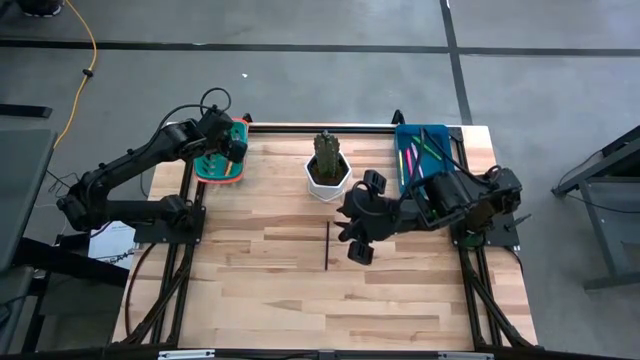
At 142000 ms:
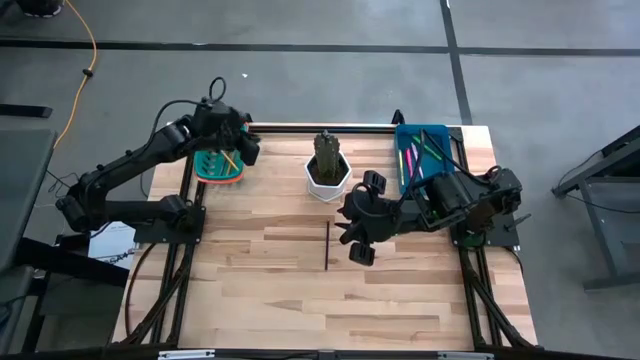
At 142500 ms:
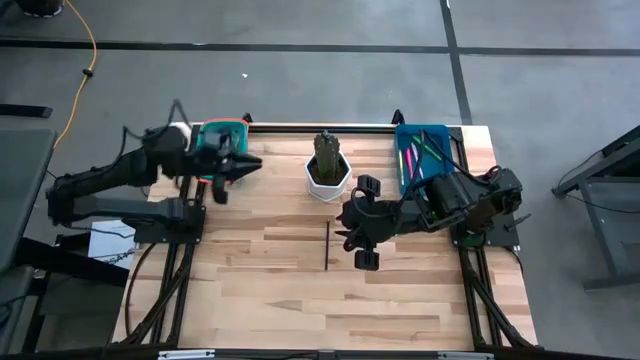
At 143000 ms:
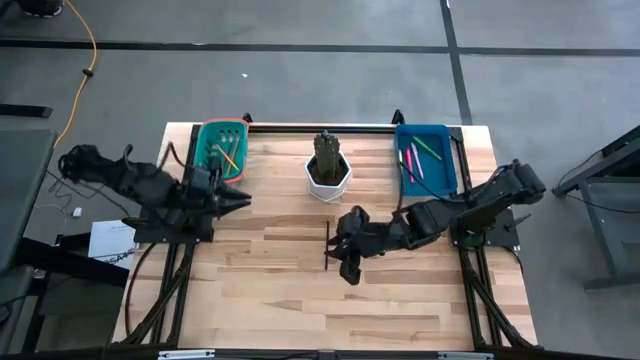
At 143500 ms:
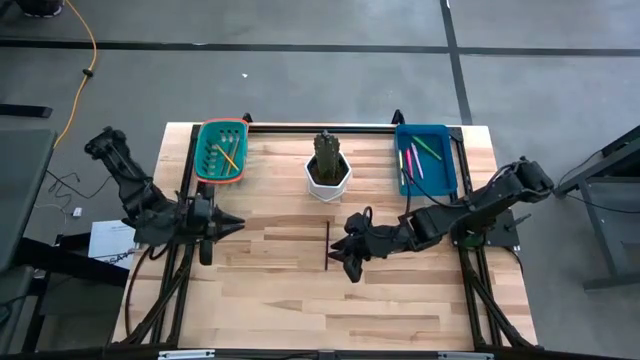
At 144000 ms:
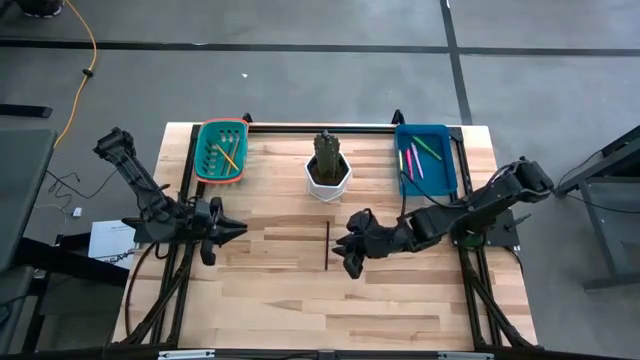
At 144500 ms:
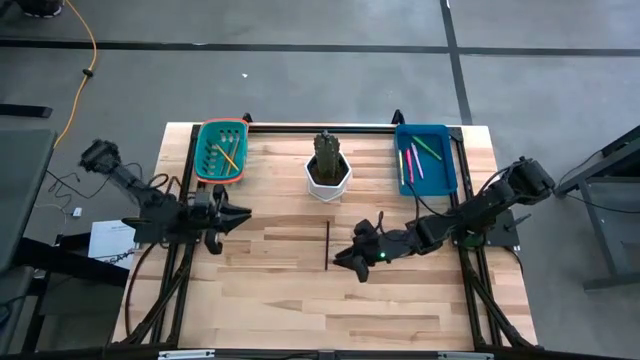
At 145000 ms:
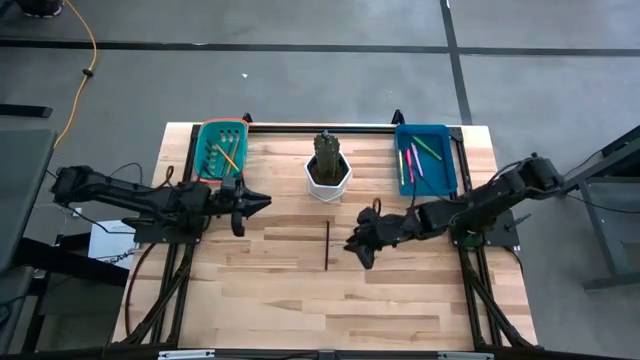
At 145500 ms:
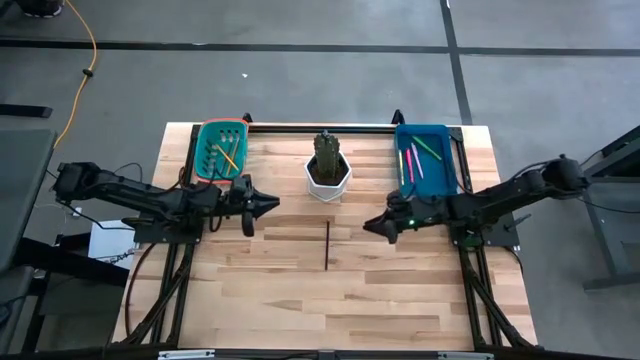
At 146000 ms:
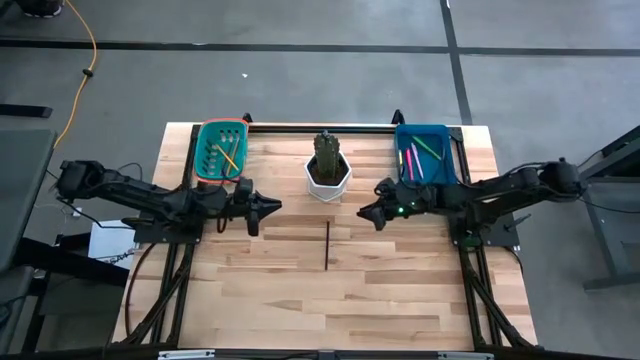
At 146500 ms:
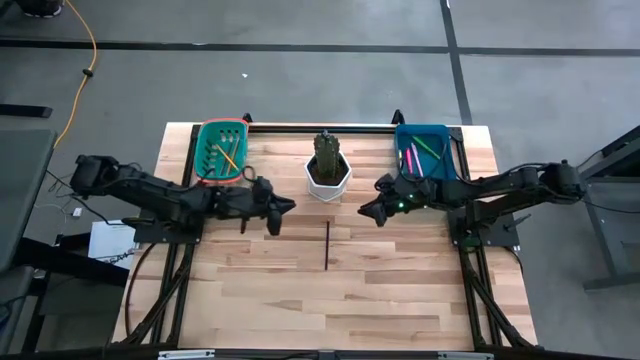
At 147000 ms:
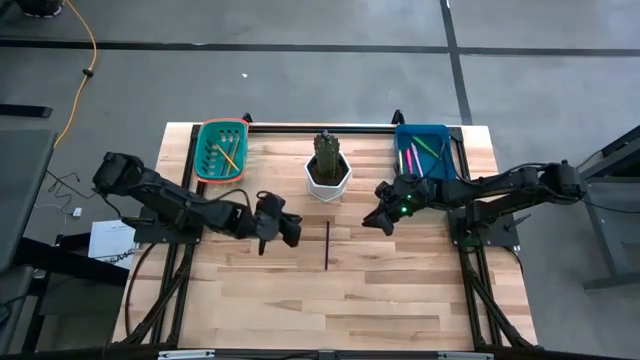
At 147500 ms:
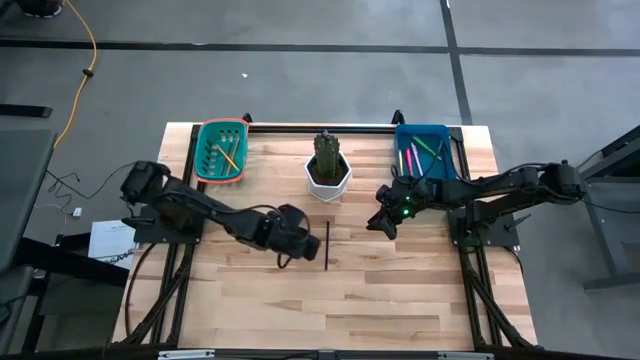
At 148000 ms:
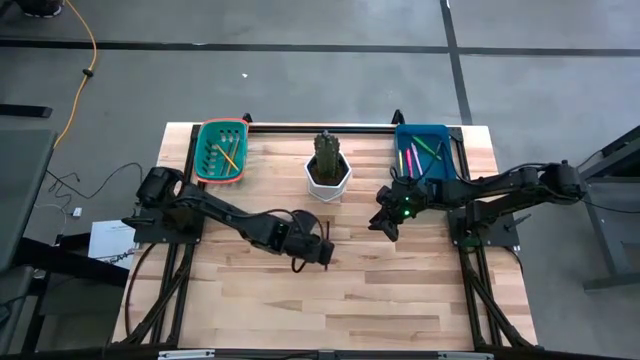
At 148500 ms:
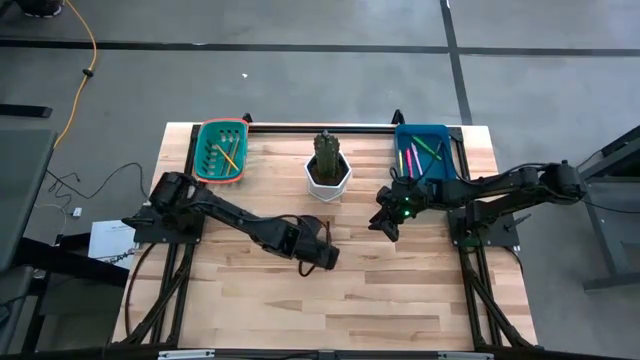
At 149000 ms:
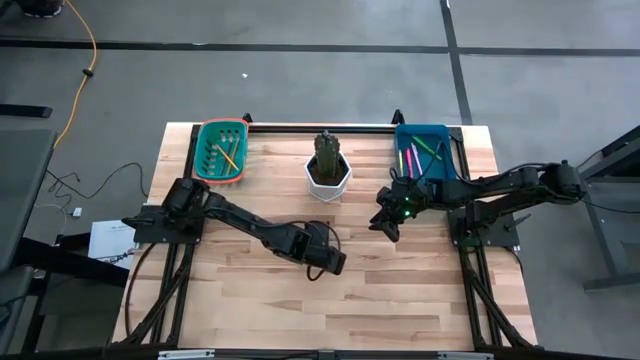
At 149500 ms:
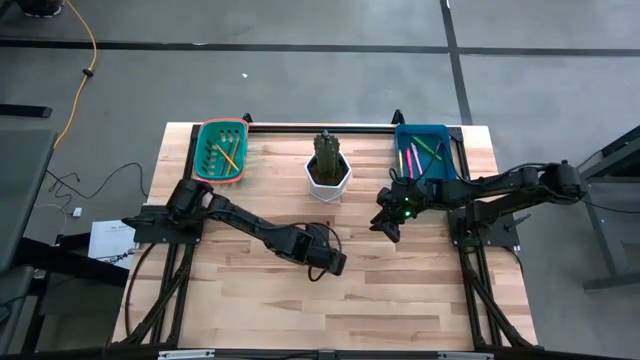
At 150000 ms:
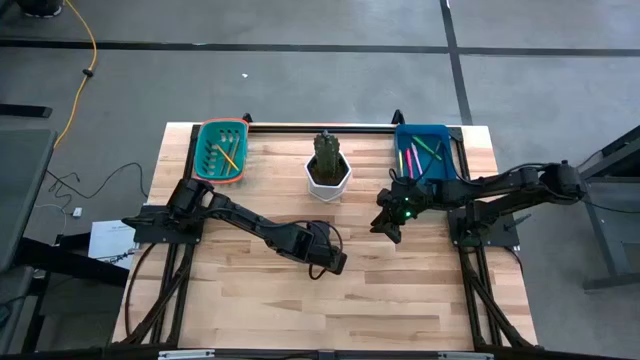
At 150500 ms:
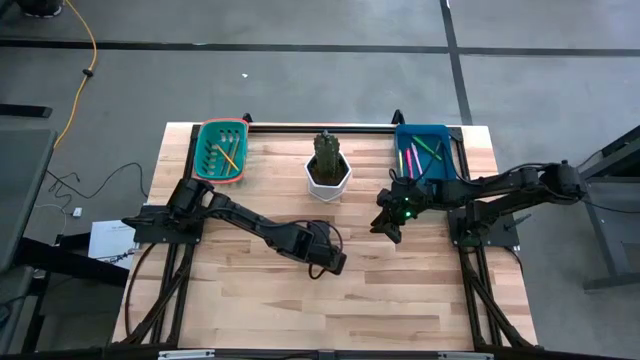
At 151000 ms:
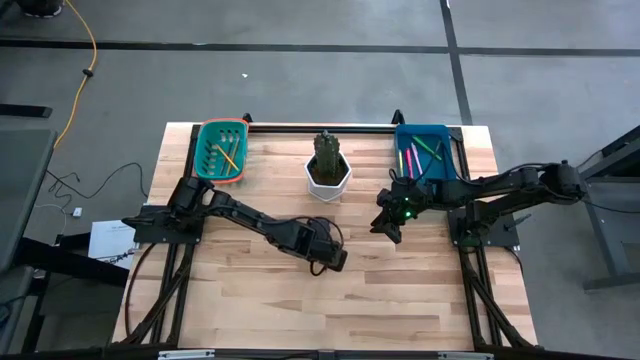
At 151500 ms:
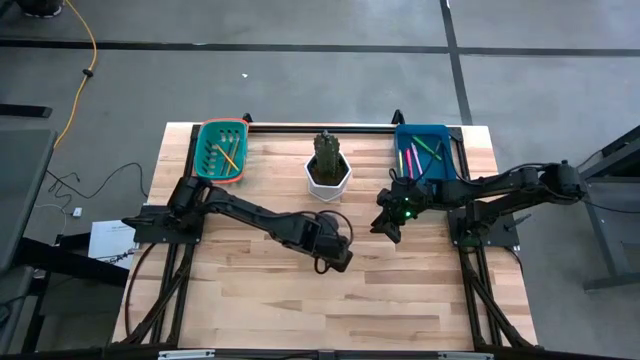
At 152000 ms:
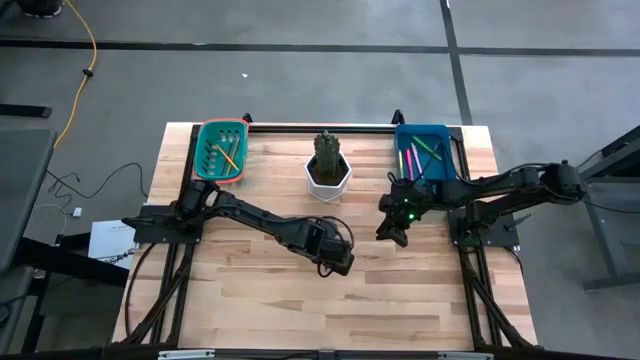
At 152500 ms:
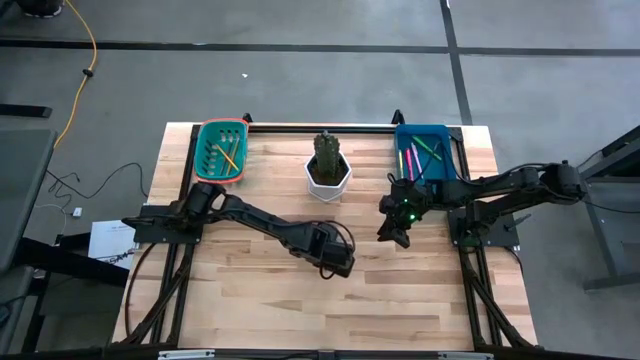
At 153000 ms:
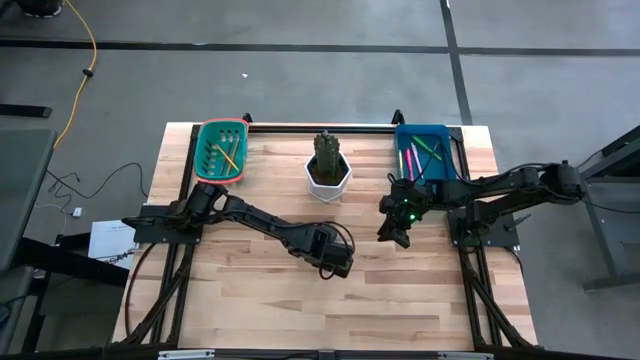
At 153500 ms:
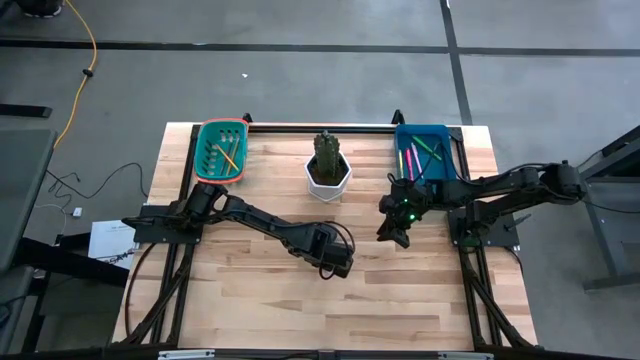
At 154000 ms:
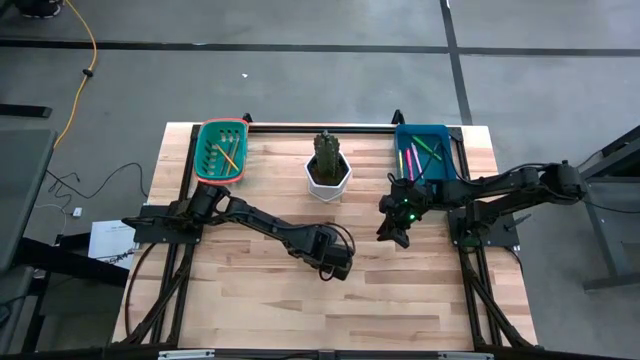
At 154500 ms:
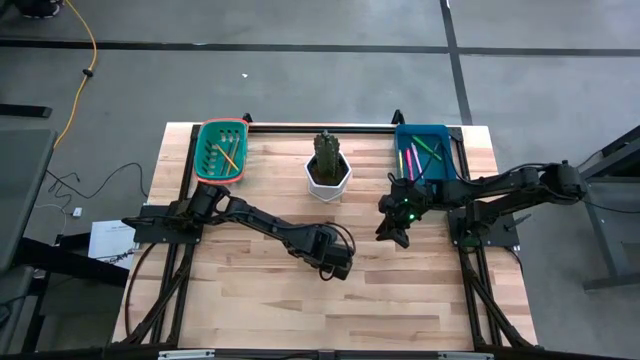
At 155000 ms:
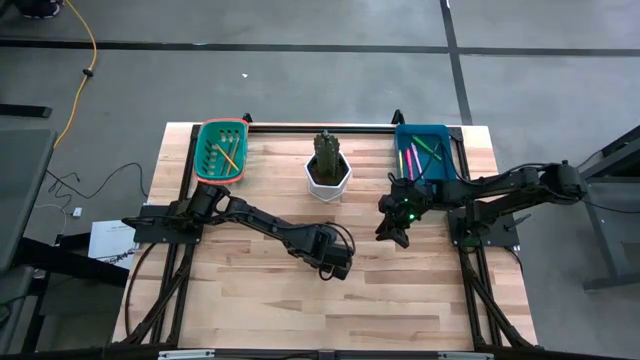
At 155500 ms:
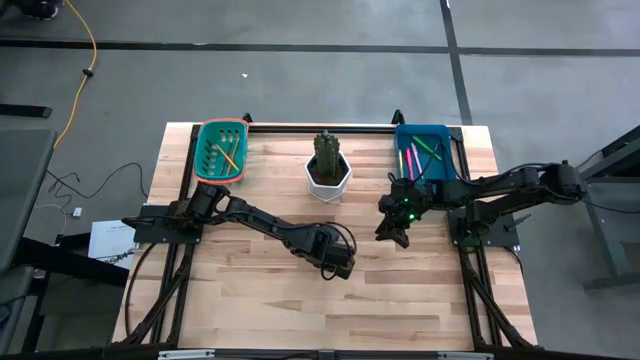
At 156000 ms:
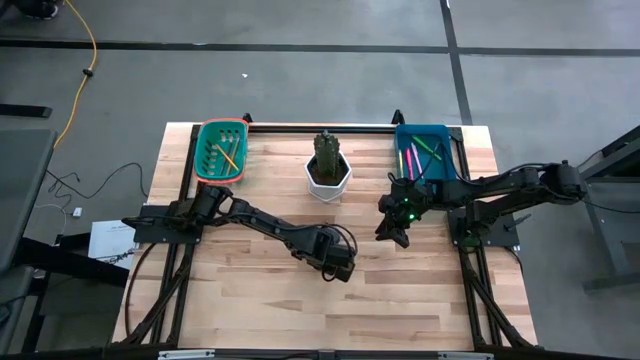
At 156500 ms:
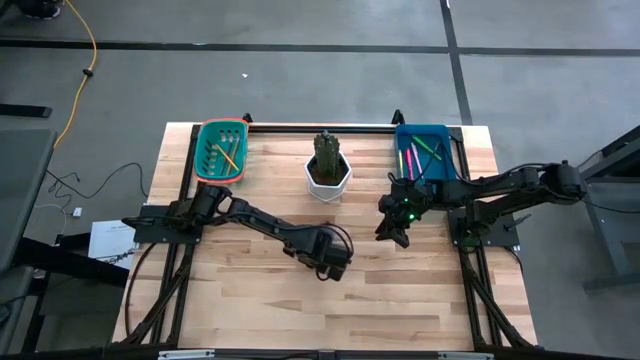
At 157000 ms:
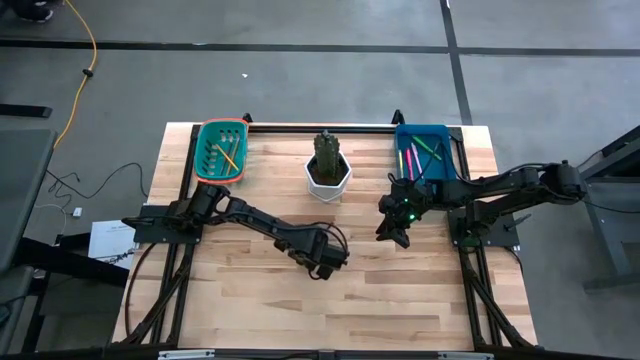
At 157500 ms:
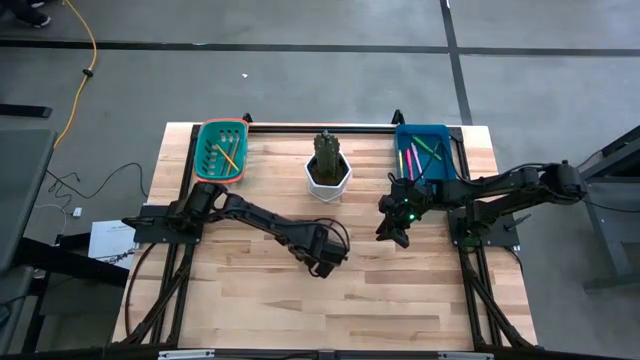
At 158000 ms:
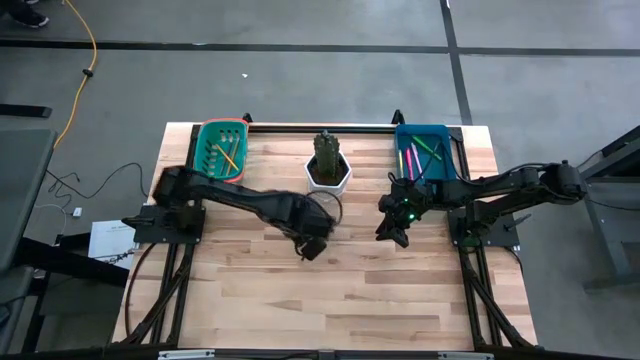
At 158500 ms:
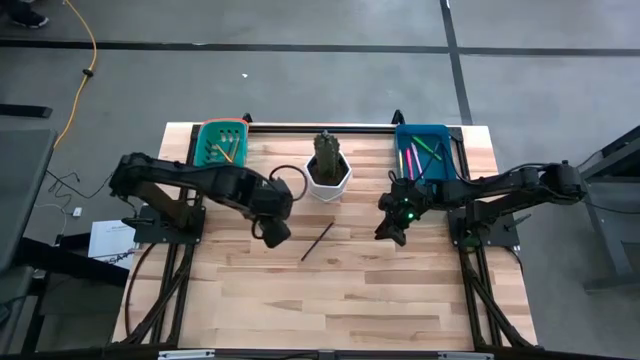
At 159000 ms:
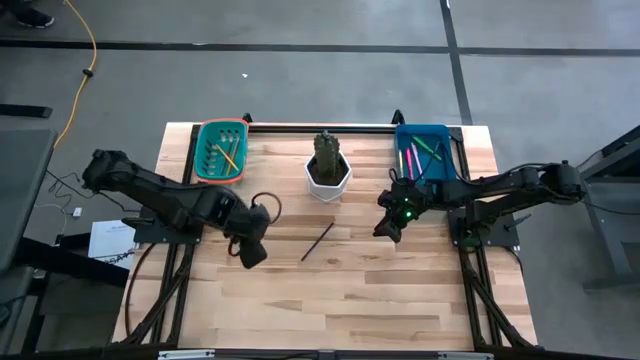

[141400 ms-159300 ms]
Task: Sort pens & pencils
Put the dark blue pencil into the green bin
